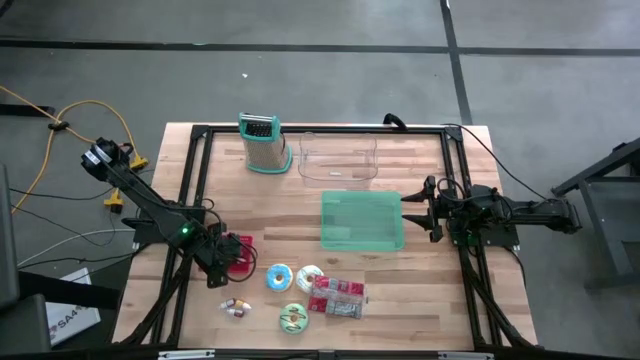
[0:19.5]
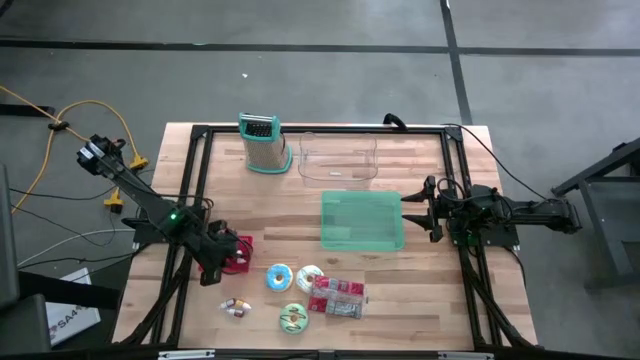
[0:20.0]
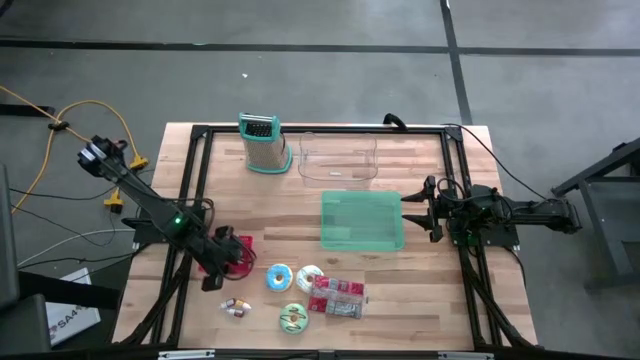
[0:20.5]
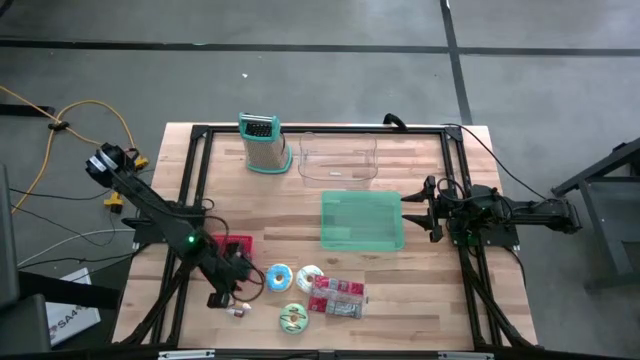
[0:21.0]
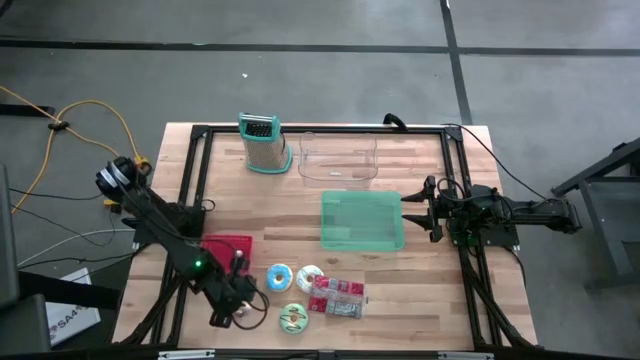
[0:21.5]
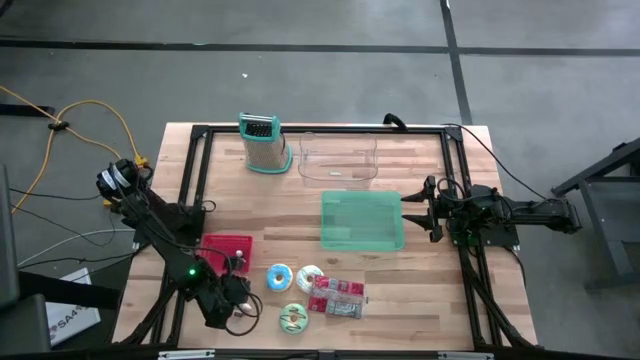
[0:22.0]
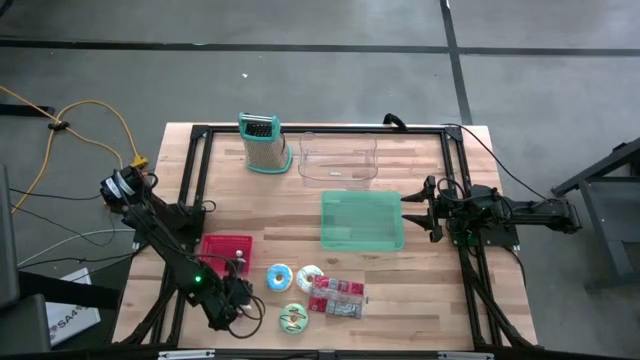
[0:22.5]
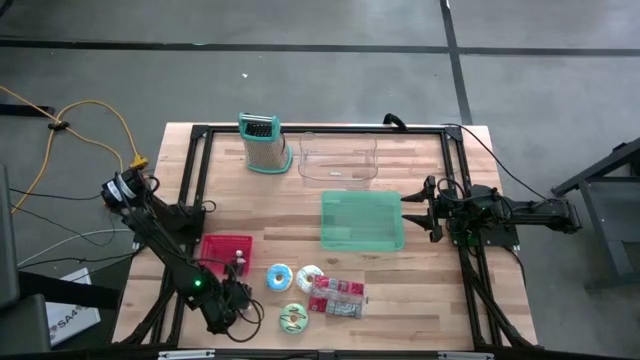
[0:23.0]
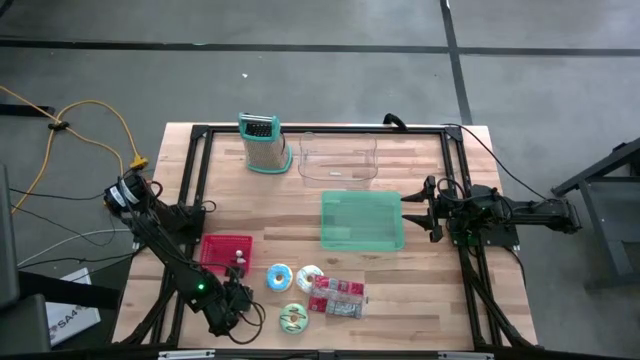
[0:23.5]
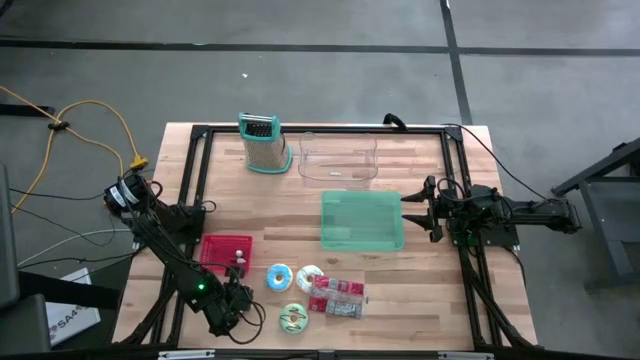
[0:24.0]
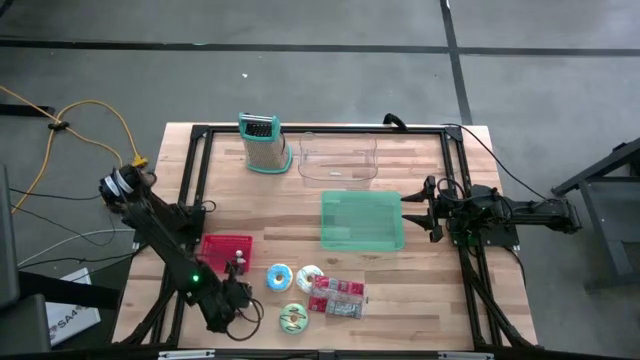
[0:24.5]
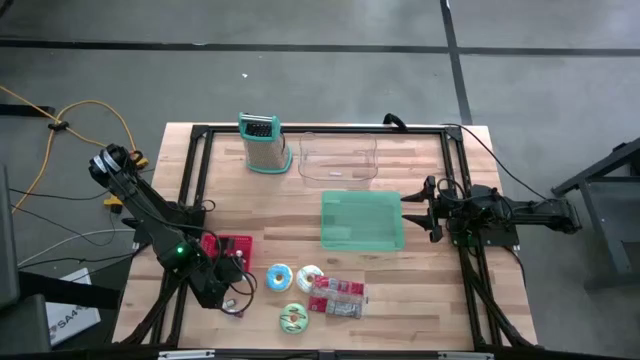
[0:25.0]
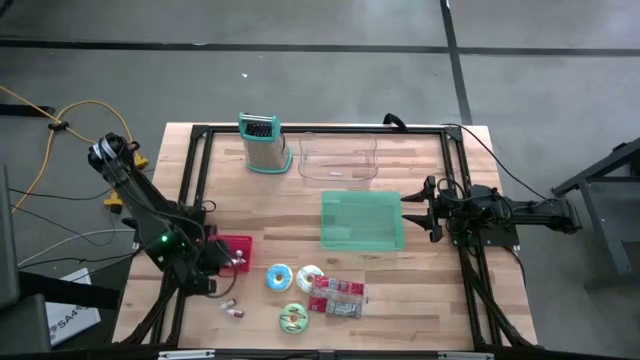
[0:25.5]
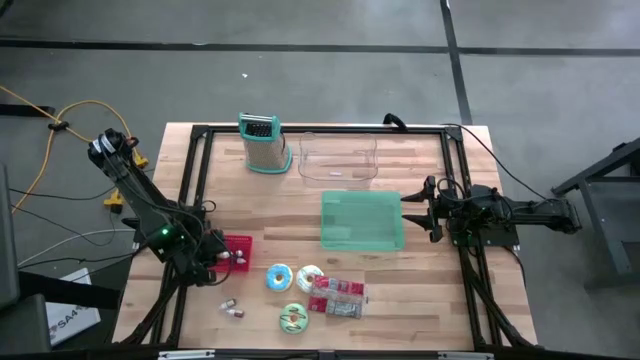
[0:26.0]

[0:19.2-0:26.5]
Put the yellow food coloring bottle into the red bin

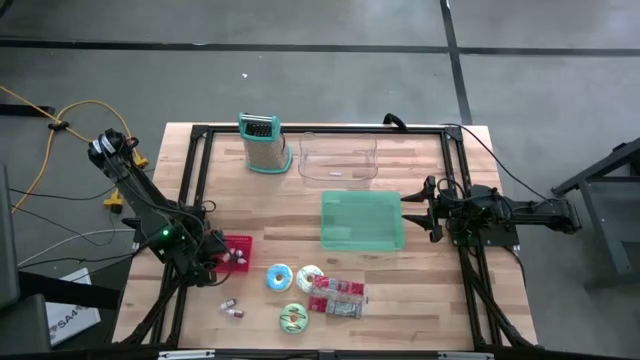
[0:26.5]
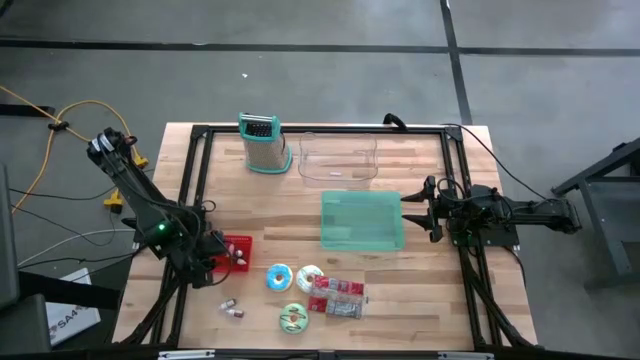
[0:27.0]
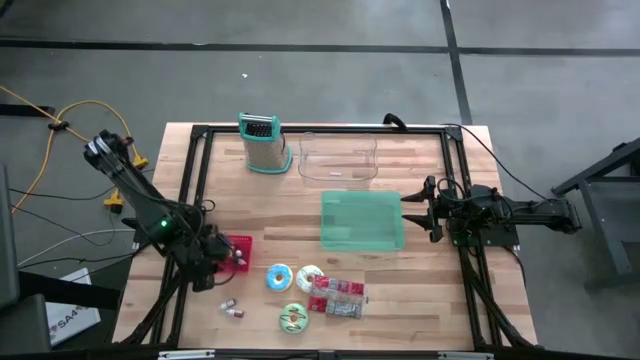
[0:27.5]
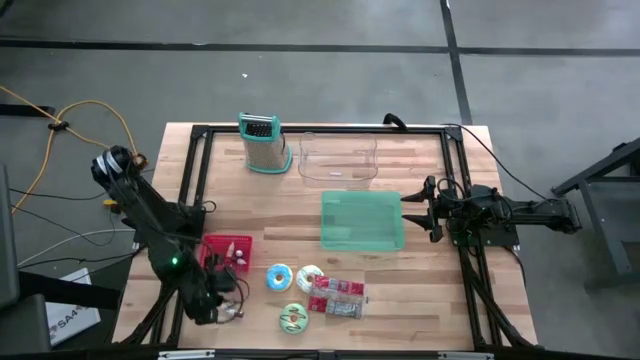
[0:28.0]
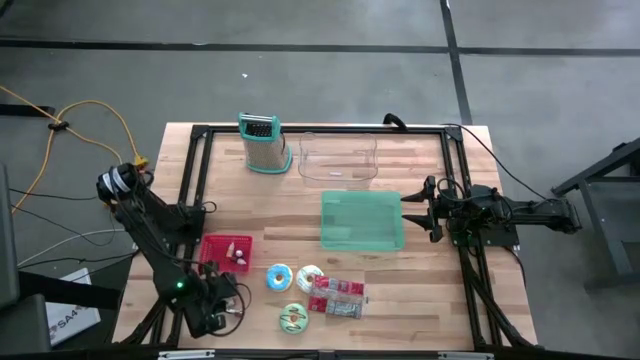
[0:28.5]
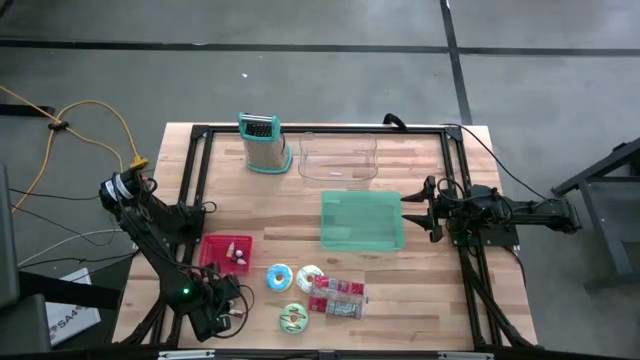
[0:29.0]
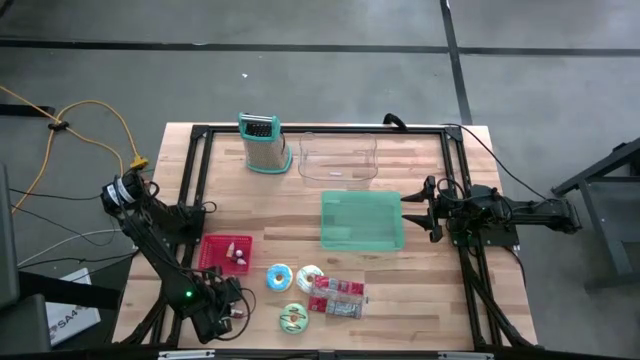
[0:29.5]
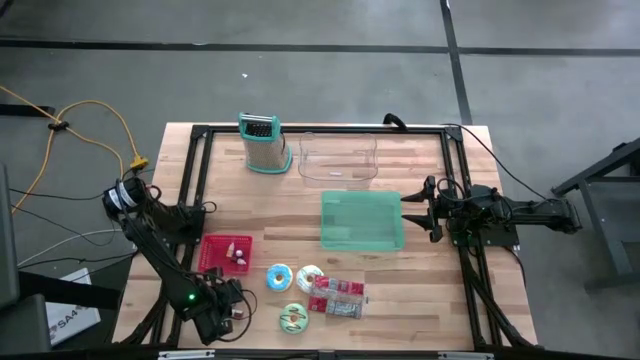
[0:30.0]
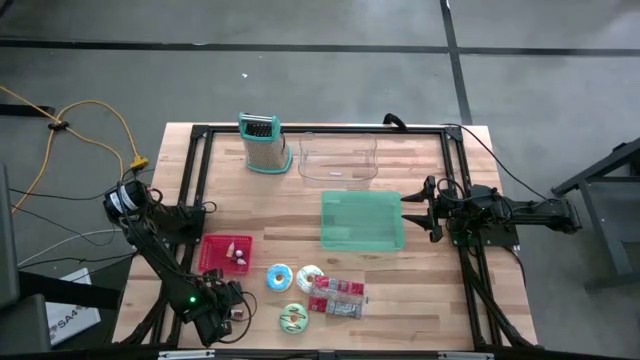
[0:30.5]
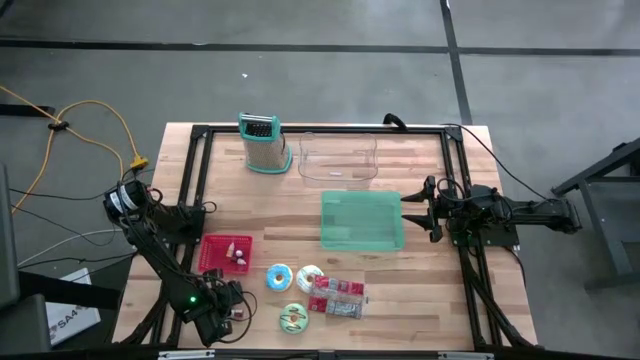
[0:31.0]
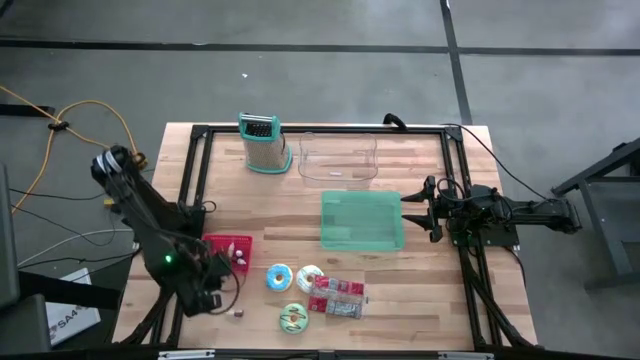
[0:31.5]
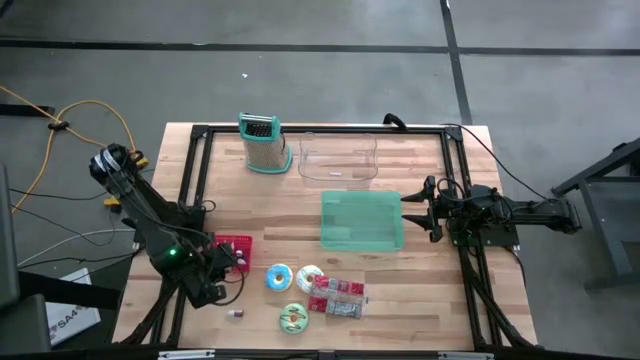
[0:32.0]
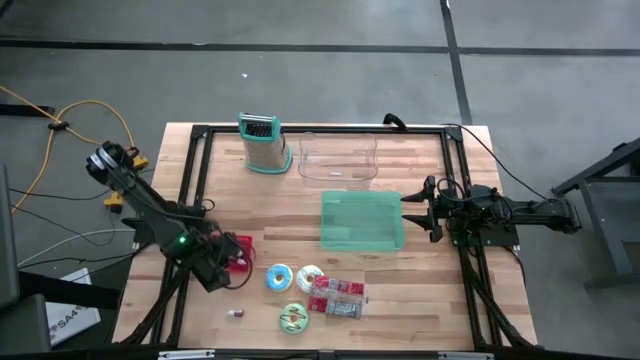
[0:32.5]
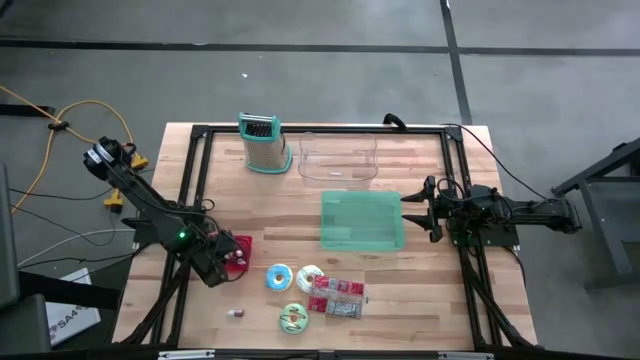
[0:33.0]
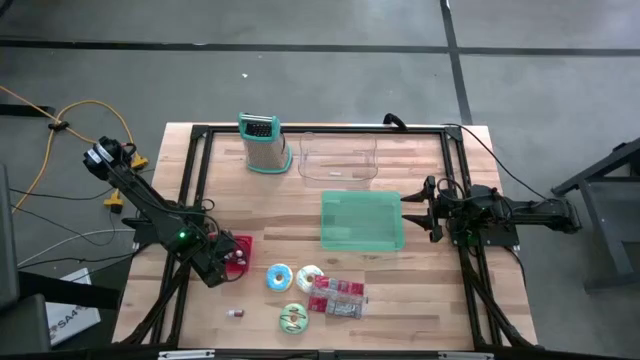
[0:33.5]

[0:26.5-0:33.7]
Put the top red food coloring bottle into the red bin

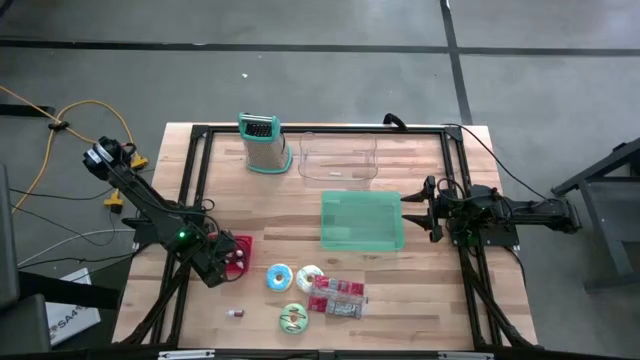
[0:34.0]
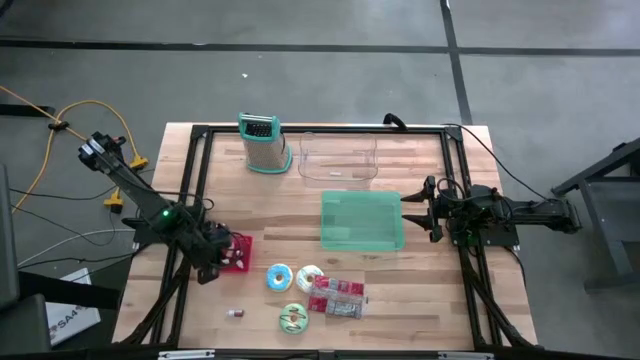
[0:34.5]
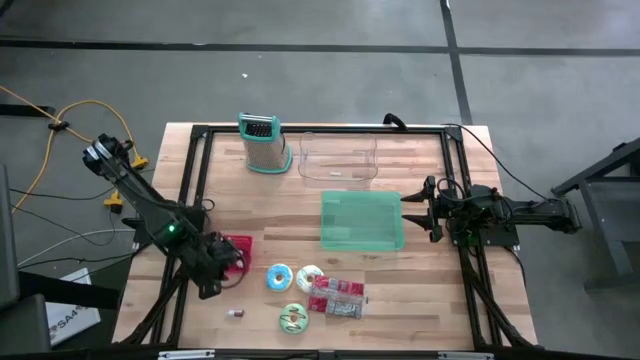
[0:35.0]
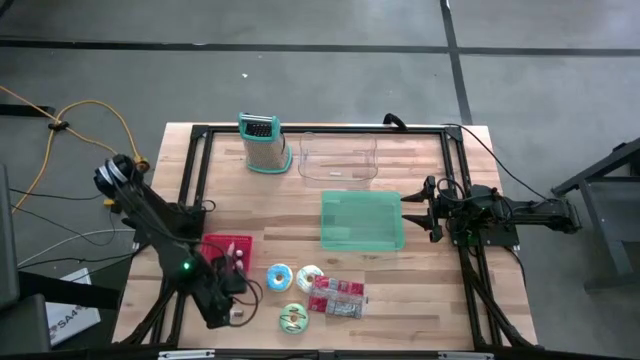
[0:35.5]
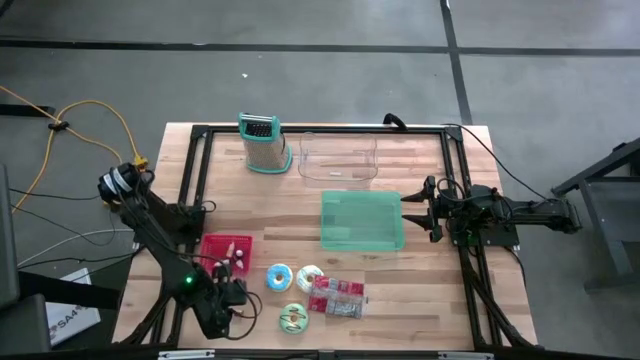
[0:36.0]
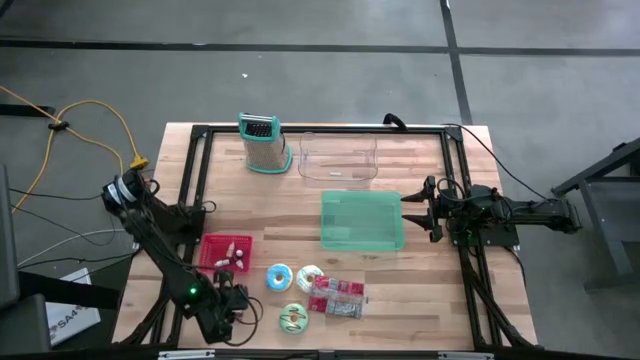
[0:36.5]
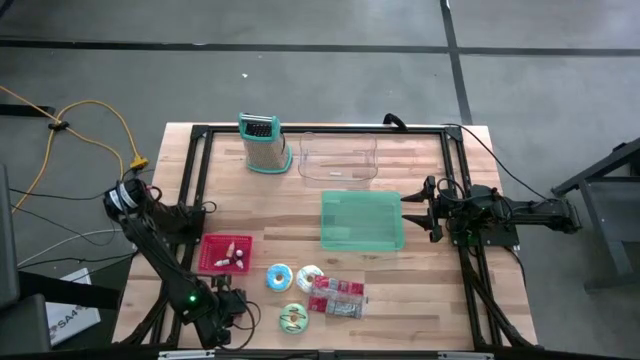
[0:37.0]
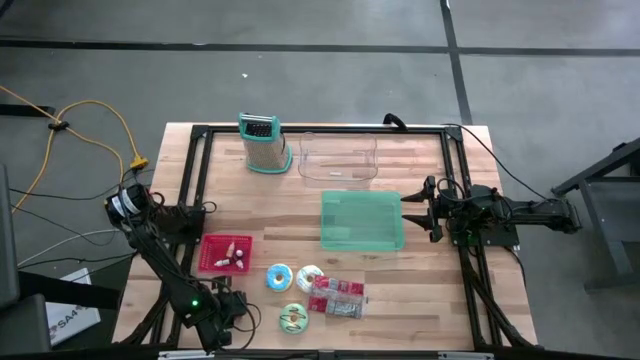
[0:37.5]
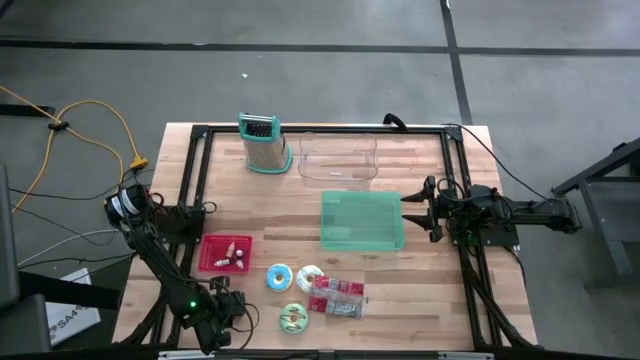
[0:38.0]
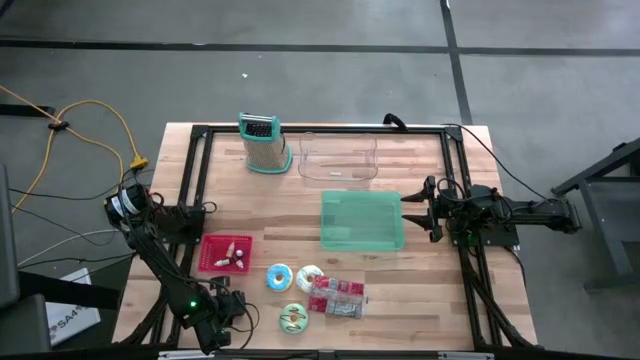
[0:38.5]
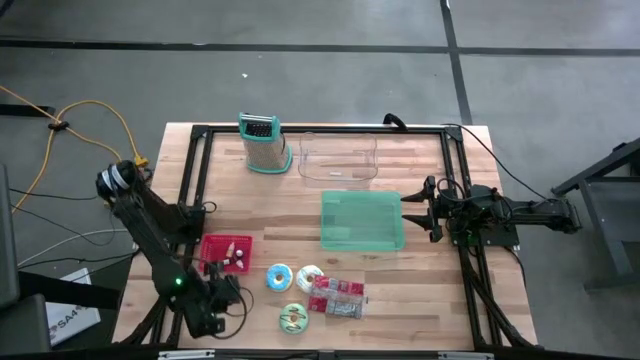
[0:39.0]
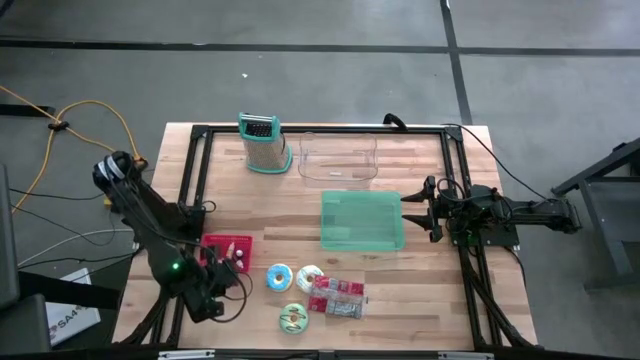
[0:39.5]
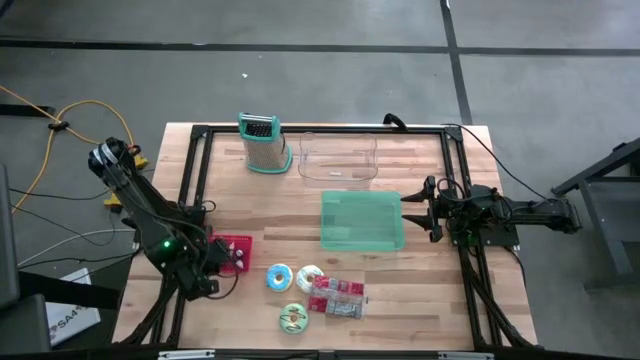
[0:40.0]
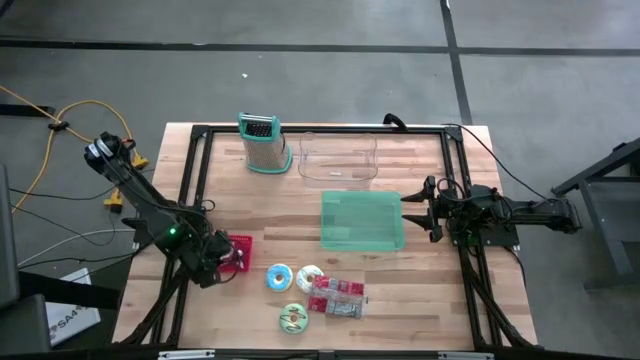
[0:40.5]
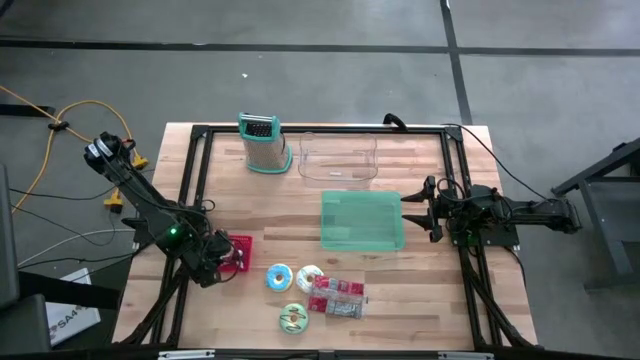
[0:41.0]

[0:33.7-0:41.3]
Put the red food coloring bottle into the red bin
